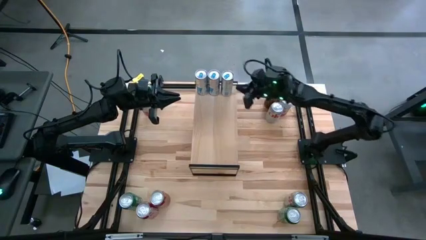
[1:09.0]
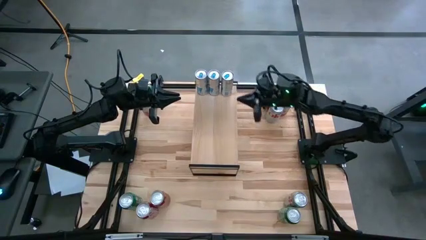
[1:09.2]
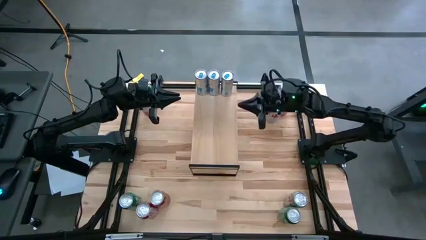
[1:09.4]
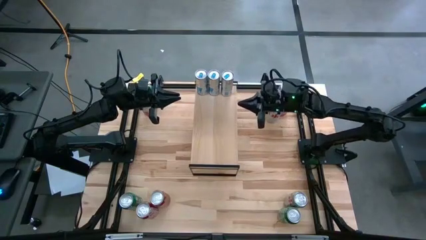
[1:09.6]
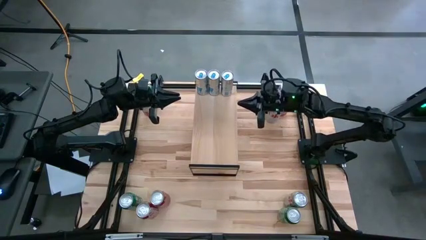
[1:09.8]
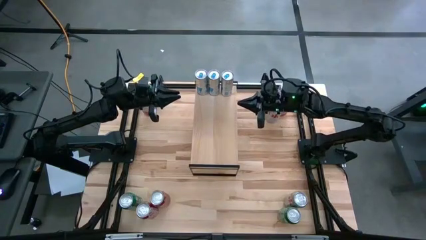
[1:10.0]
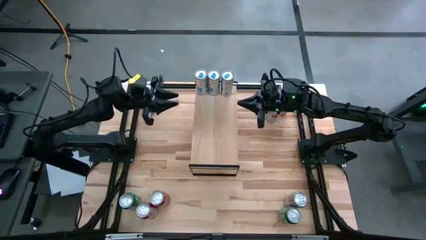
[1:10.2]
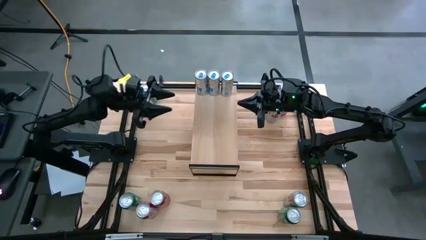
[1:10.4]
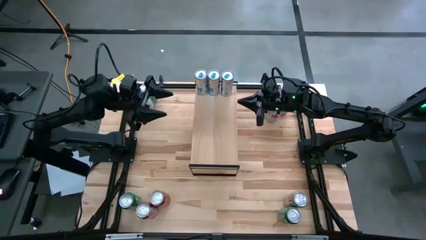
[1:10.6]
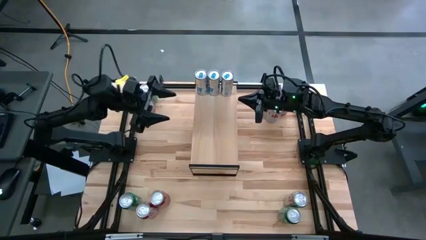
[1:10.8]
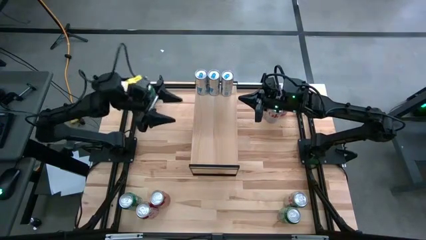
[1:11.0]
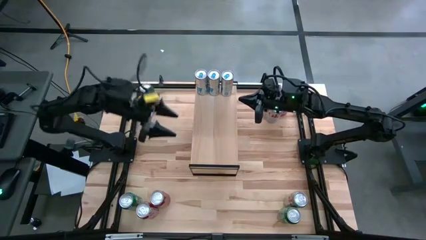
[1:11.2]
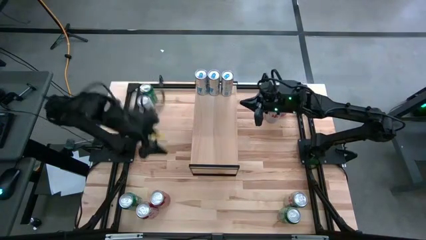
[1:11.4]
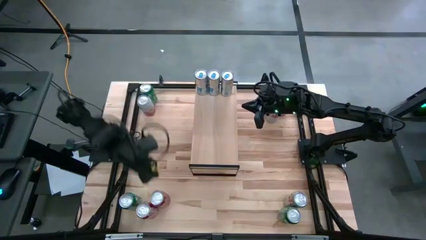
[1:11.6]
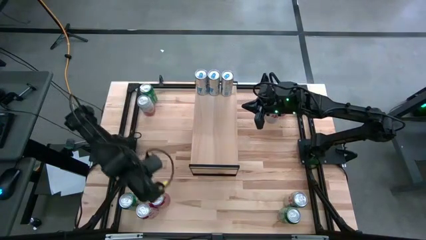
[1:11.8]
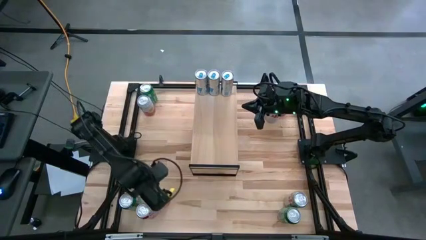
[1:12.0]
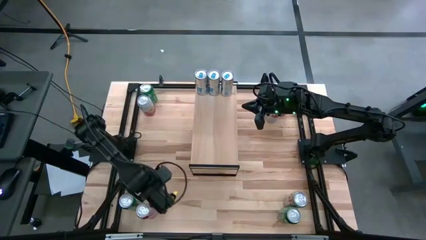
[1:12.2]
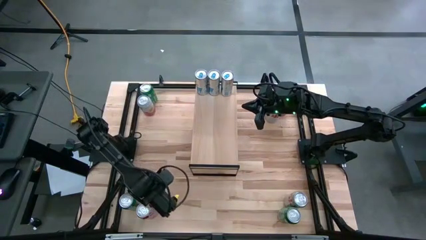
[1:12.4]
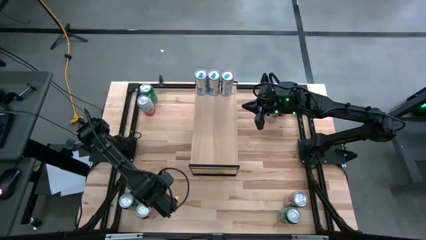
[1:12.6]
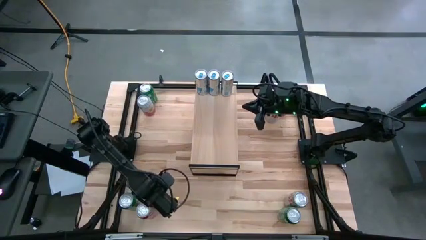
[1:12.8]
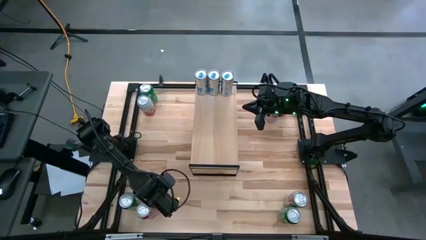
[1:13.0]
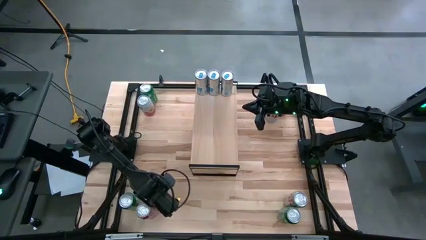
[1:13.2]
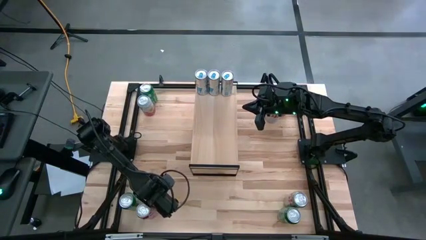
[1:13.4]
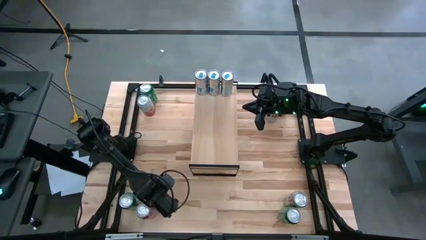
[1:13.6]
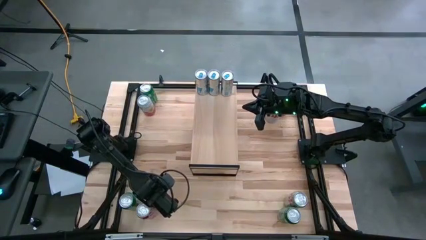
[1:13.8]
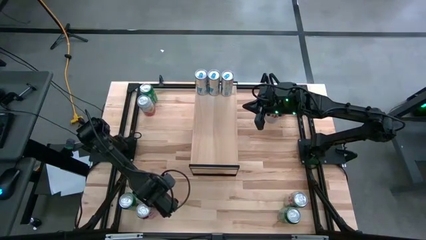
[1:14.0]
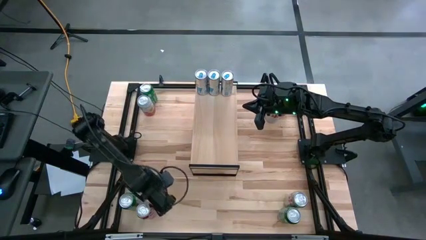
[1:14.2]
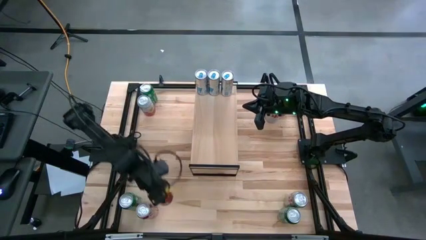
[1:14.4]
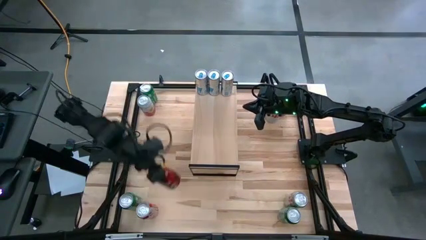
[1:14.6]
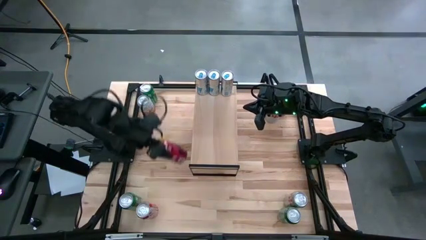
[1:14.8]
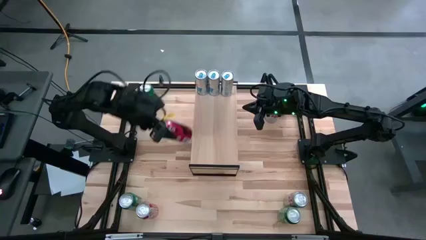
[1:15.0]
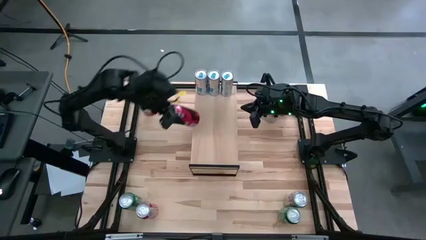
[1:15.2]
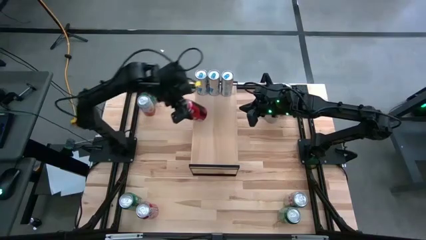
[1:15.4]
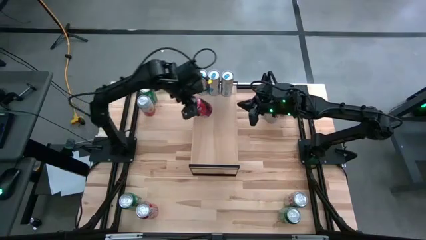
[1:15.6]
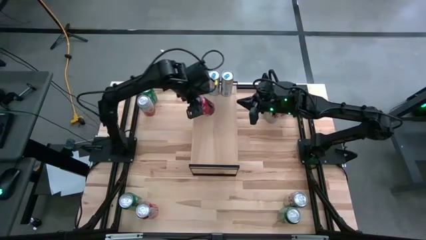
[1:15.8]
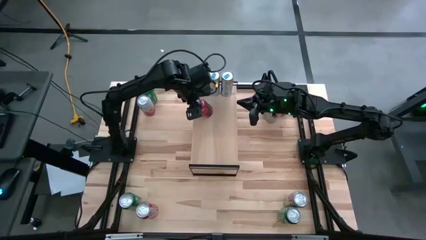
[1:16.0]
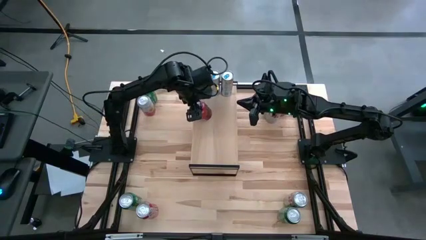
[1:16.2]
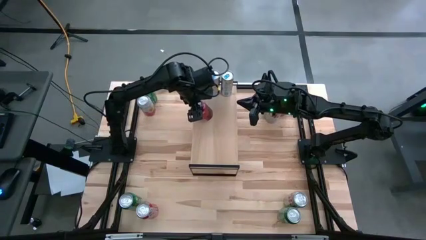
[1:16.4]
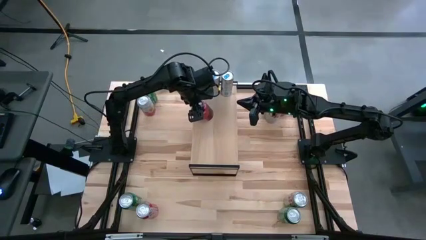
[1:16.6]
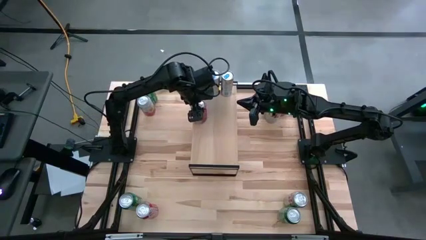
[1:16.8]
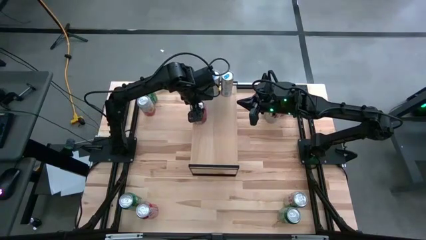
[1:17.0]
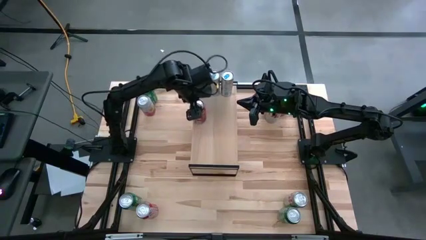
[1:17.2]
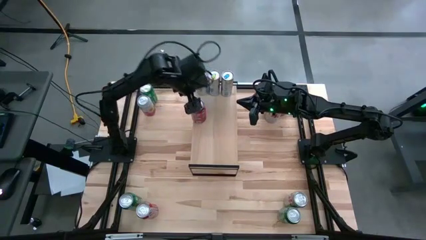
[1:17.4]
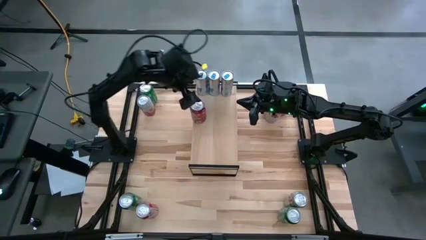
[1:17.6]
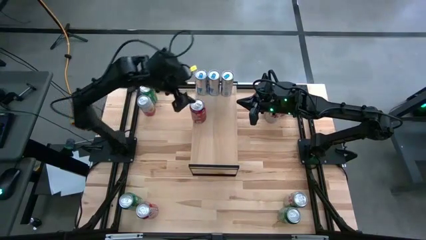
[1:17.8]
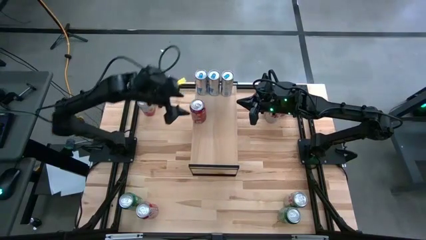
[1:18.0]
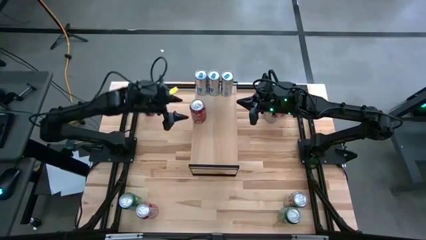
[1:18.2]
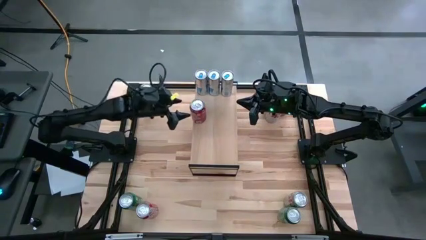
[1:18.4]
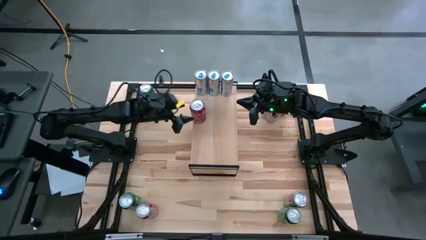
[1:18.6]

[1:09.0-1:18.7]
Task: Place canned beverage on shelf
Put the middle red white soda can on the shelf

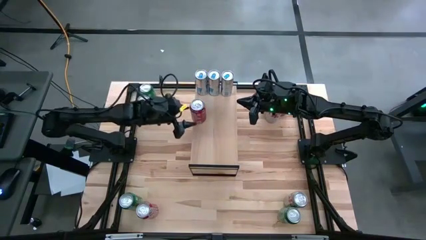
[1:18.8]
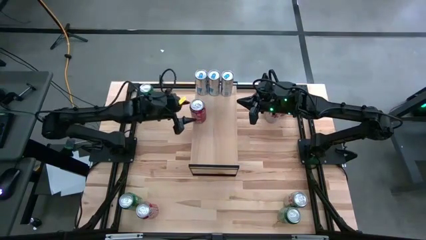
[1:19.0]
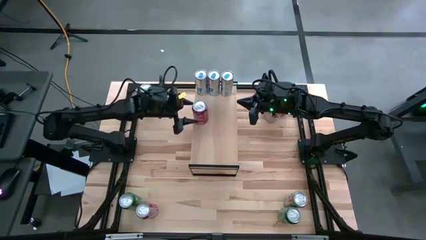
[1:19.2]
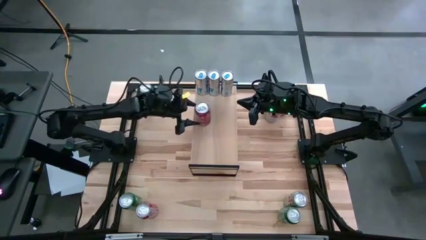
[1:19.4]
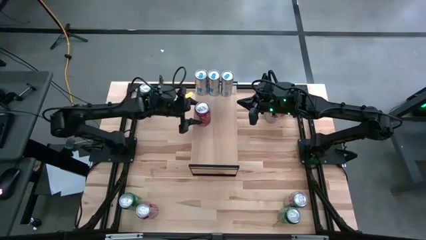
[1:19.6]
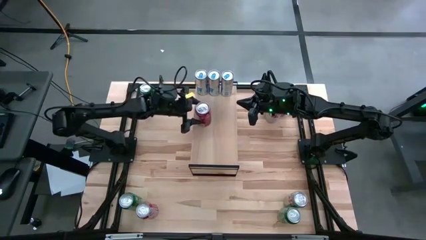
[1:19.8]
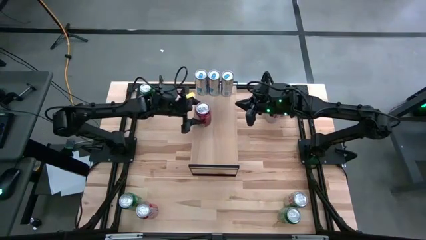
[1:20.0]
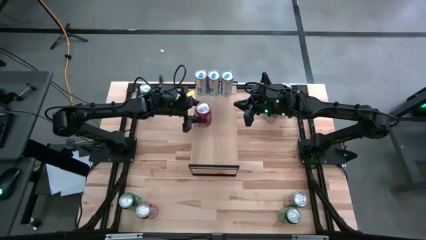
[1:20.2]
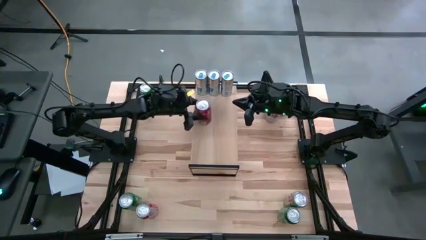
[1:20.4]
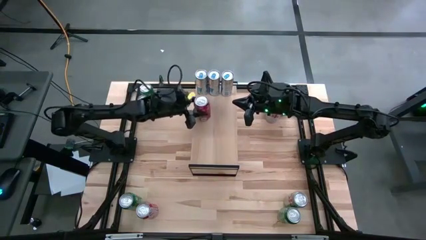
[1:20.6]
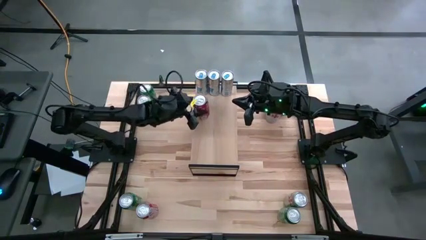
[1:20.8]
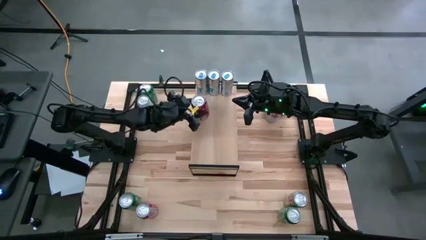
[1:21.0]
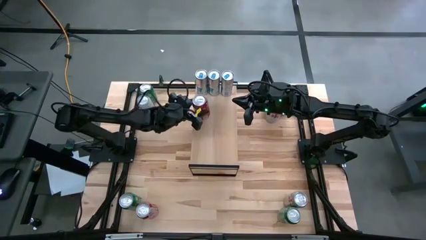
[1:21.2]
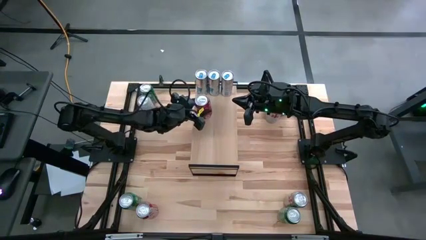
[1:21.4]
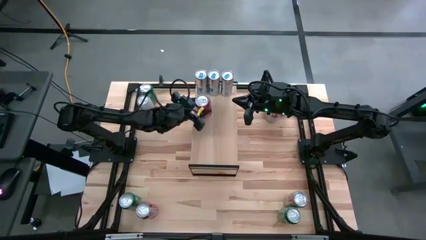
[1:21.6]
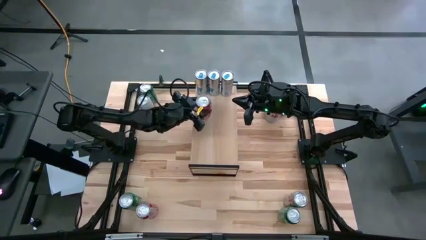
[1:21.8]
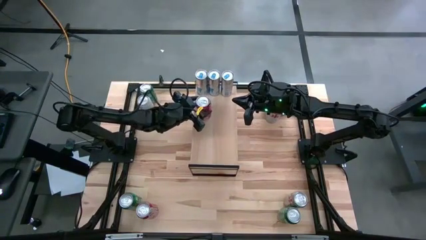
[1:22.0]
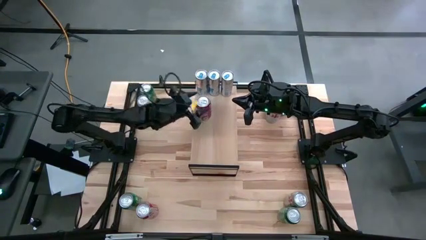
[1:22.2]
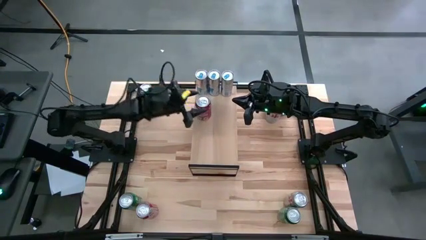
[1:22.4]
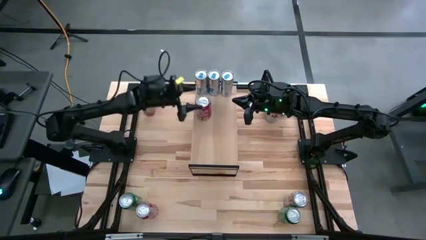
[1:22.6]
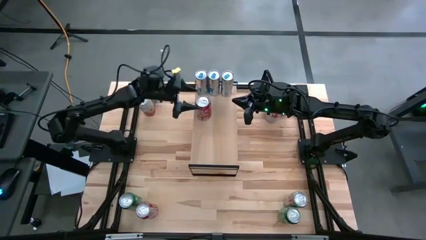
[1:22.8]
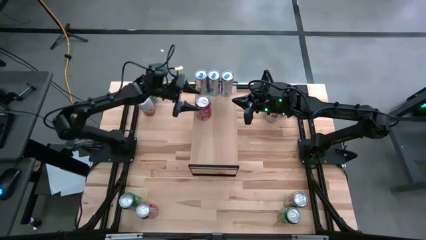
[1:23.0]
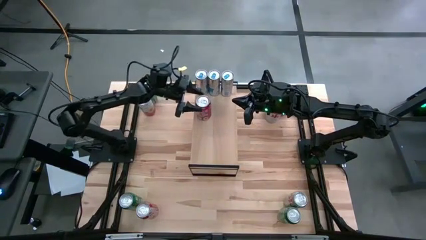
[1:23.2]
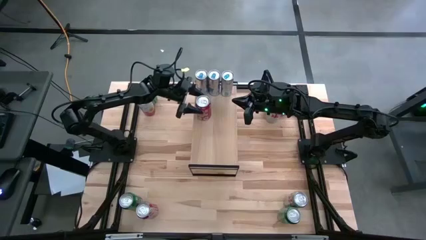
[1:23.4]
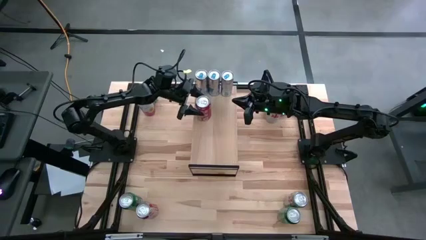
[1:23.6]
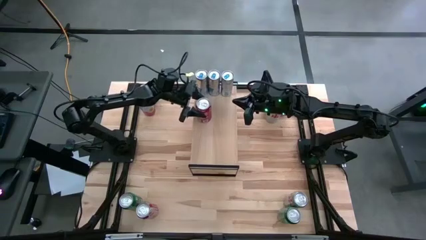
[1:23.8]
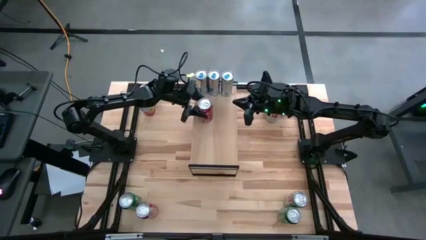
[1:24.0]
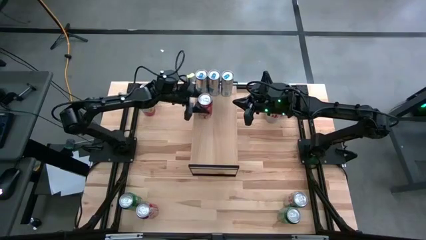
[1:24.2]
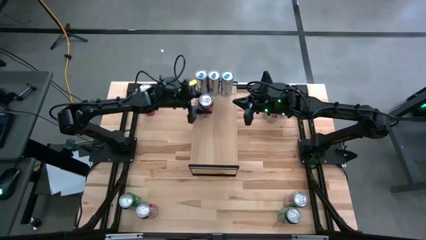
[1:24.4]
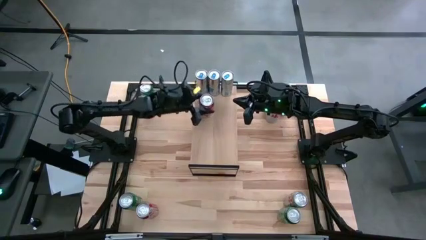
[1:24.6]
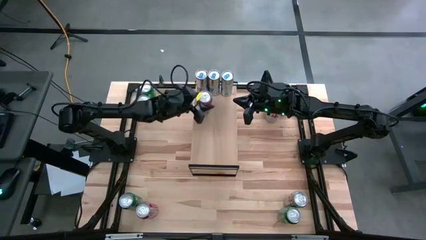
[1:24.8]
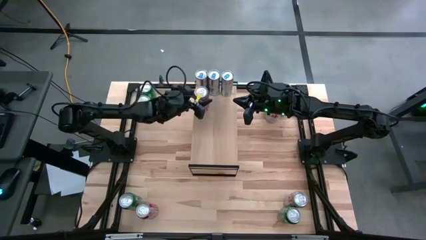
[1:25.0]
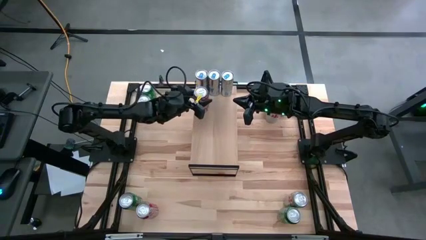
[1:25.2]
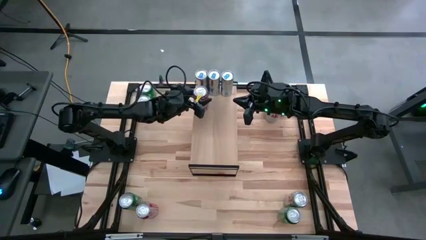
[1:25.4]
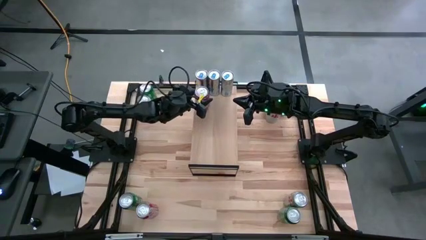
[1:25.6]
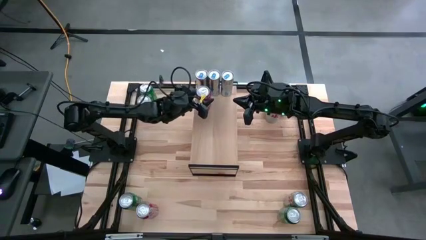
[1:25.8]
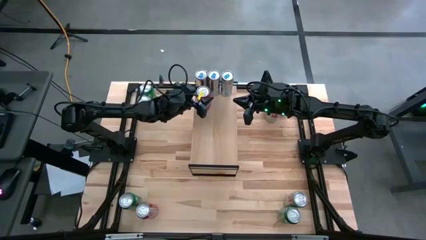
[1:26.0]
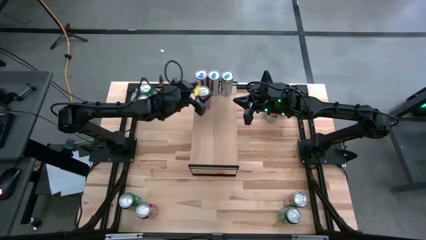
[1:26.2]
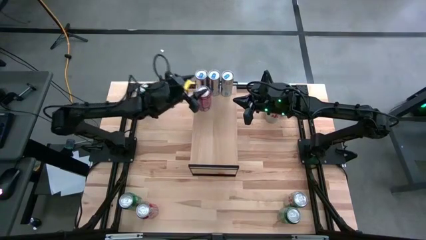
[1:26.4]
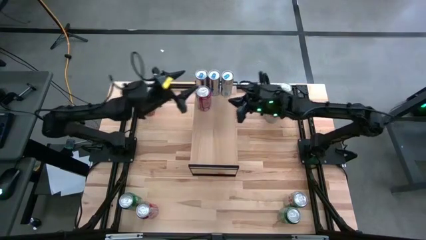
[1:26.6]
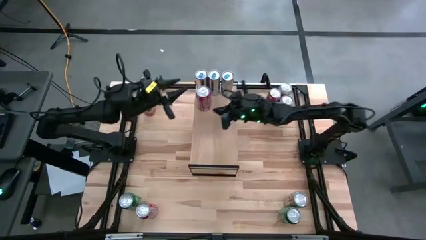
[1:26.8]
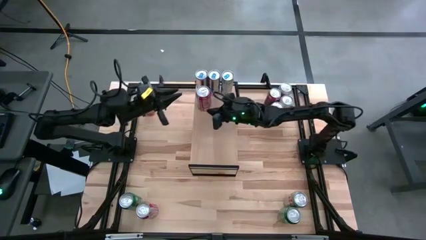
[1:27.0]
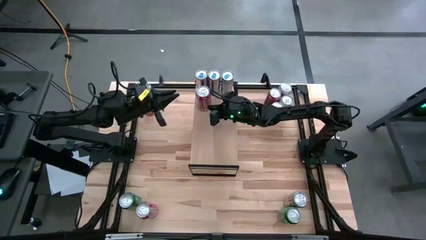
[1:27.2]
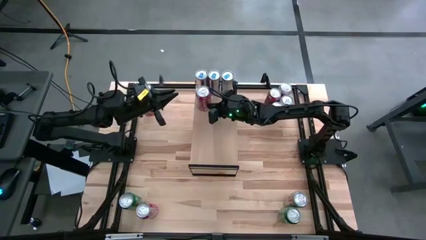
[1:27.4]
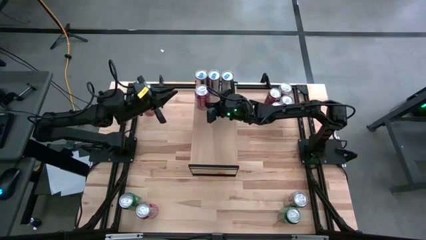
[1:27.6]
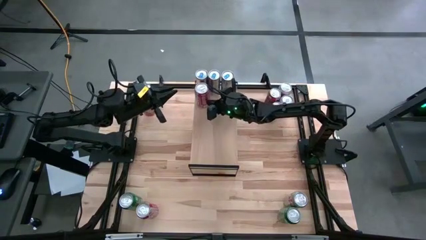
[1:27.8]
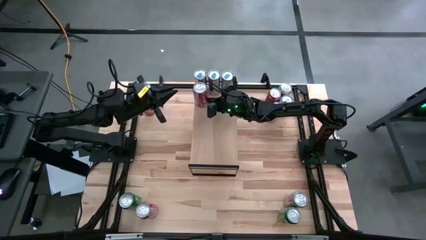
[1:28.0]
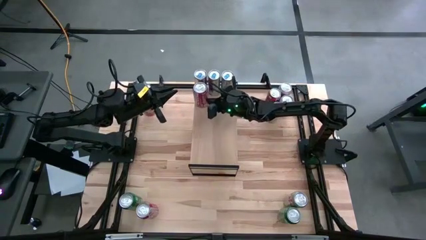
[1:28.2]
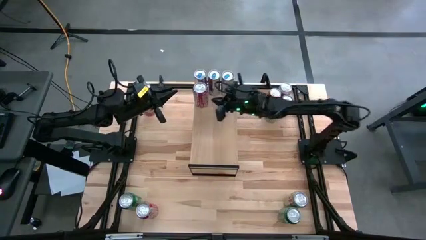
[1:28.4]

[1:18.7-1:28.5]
Put the middle red white soda can on the shelf
